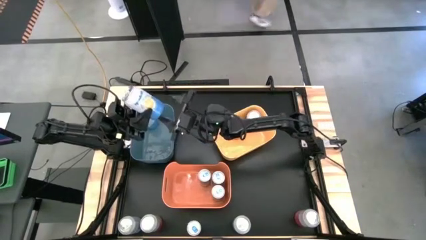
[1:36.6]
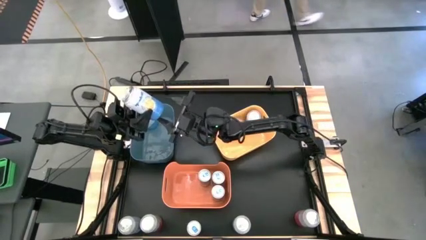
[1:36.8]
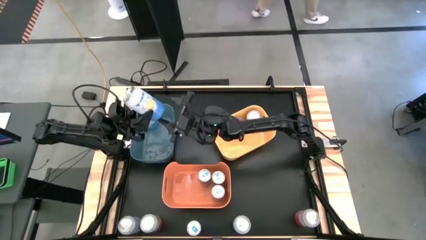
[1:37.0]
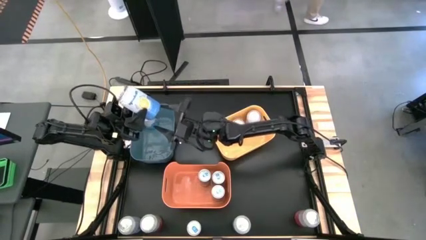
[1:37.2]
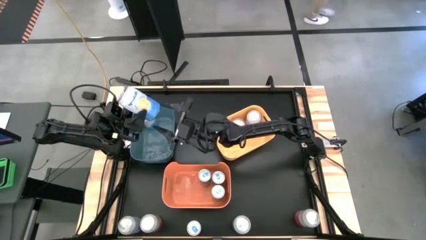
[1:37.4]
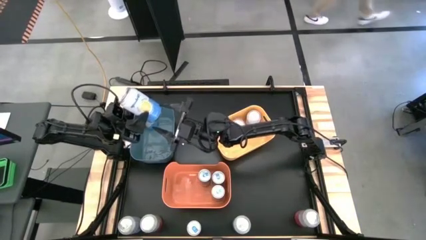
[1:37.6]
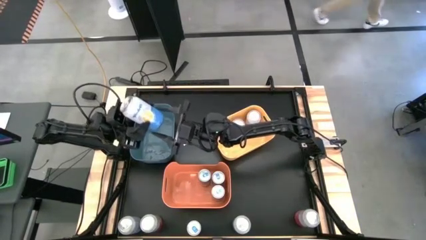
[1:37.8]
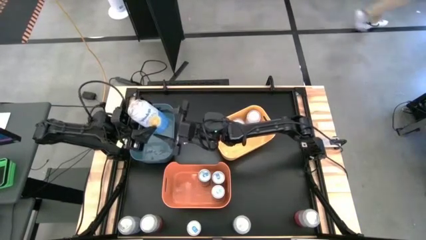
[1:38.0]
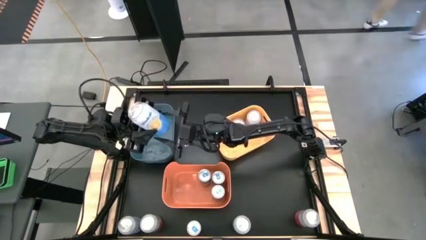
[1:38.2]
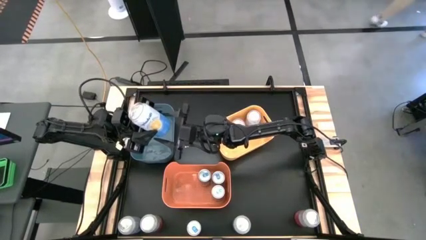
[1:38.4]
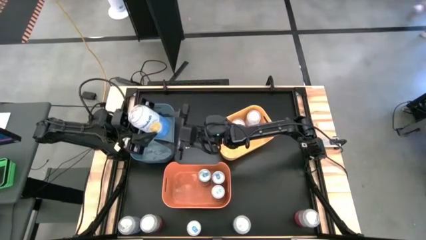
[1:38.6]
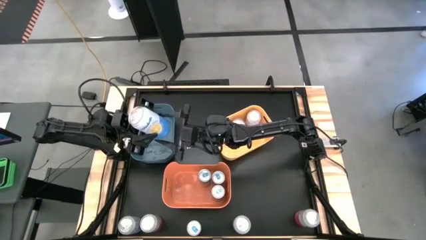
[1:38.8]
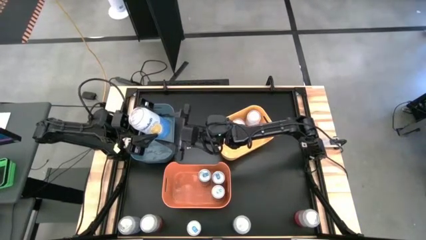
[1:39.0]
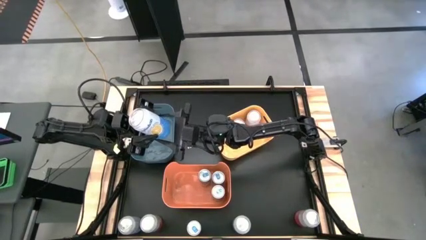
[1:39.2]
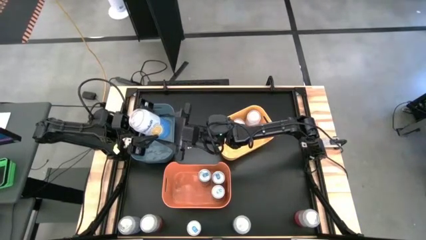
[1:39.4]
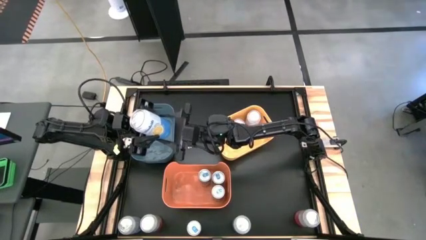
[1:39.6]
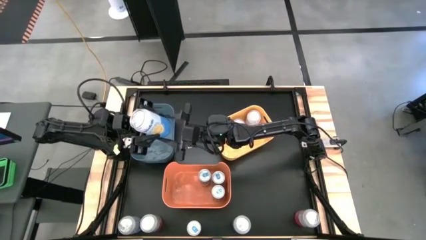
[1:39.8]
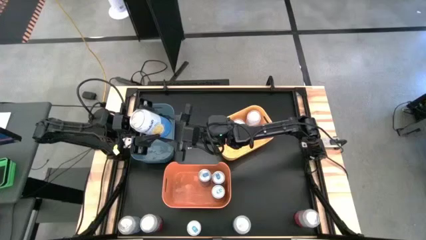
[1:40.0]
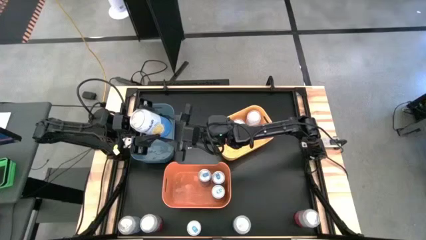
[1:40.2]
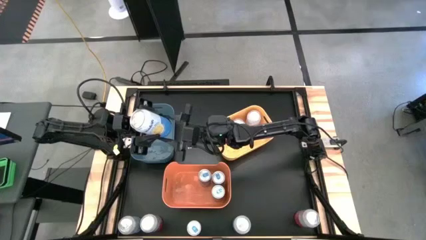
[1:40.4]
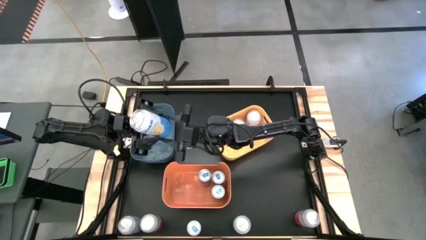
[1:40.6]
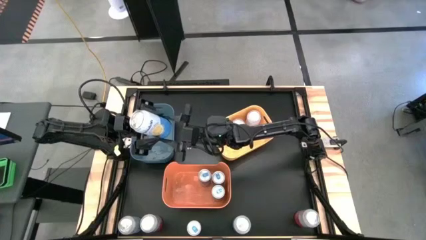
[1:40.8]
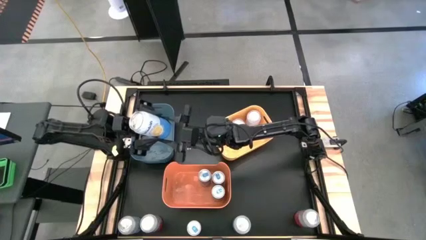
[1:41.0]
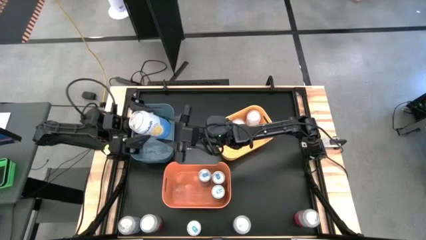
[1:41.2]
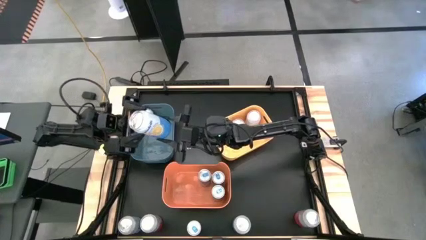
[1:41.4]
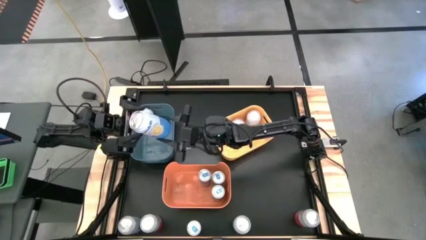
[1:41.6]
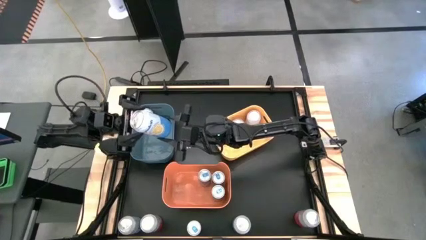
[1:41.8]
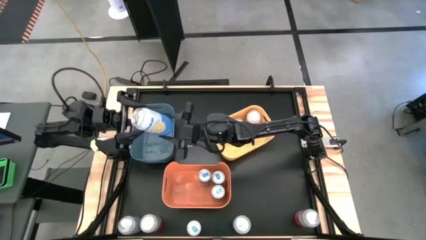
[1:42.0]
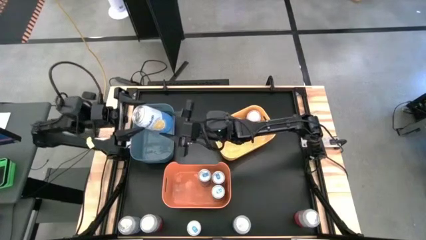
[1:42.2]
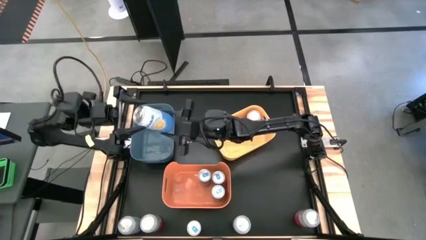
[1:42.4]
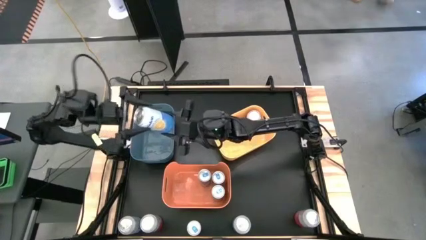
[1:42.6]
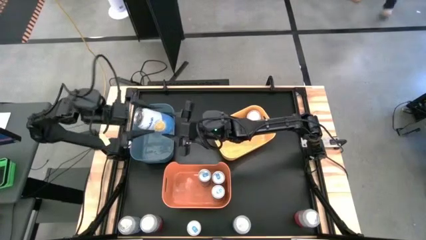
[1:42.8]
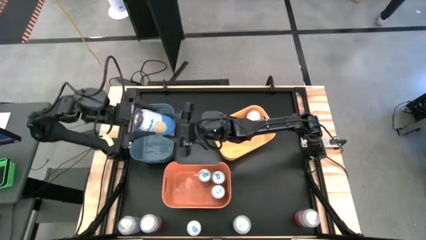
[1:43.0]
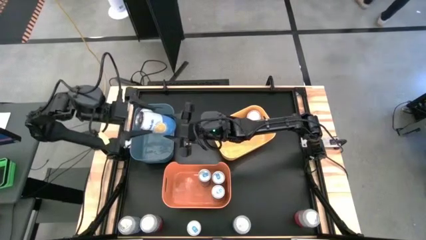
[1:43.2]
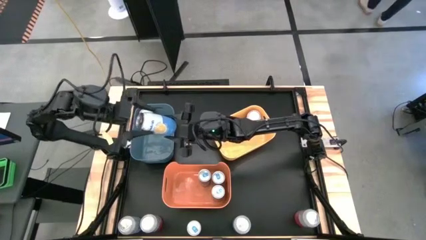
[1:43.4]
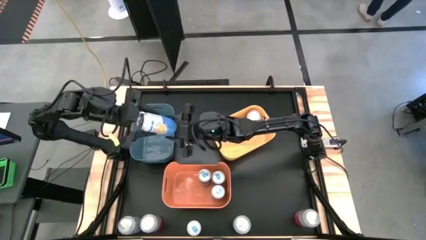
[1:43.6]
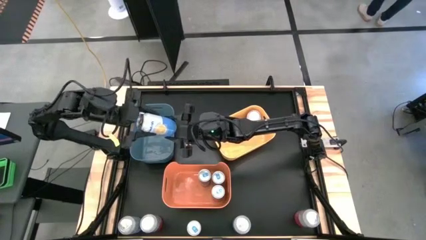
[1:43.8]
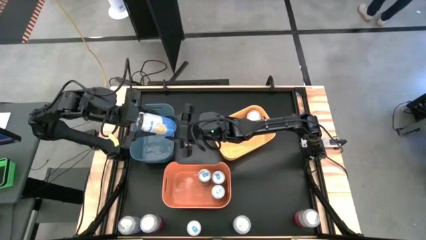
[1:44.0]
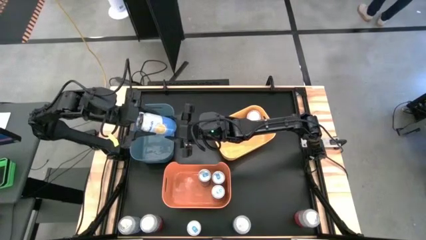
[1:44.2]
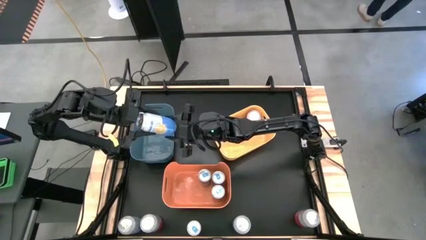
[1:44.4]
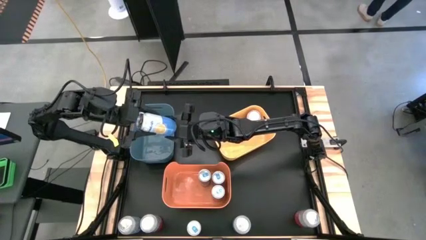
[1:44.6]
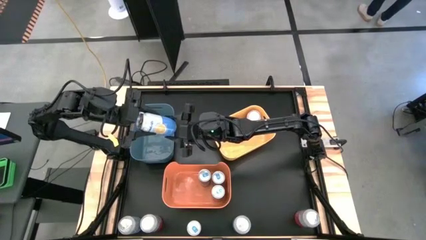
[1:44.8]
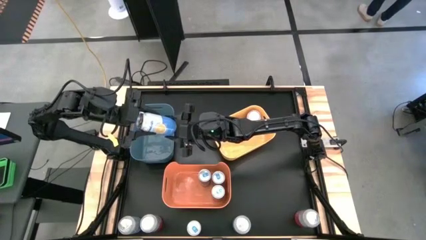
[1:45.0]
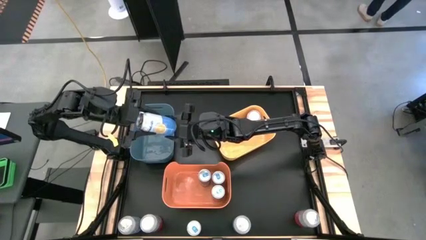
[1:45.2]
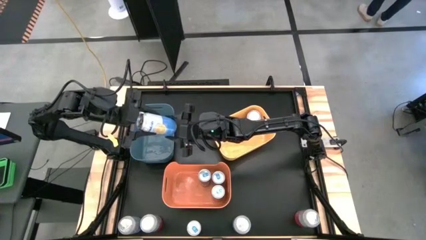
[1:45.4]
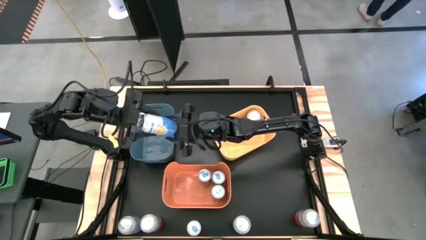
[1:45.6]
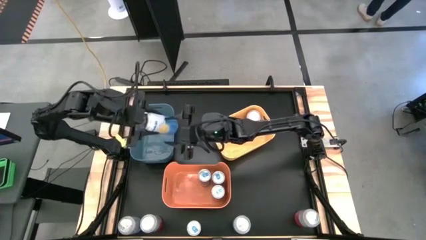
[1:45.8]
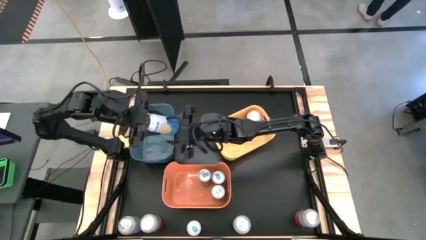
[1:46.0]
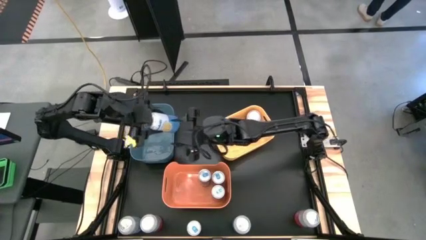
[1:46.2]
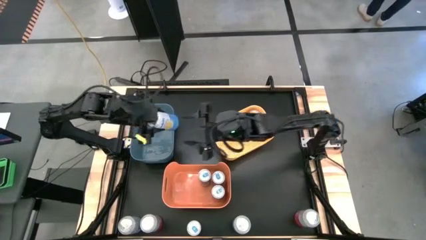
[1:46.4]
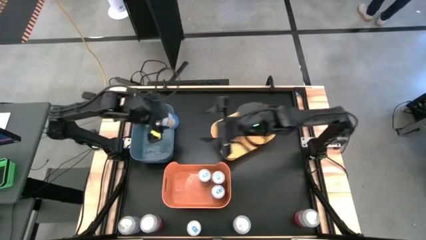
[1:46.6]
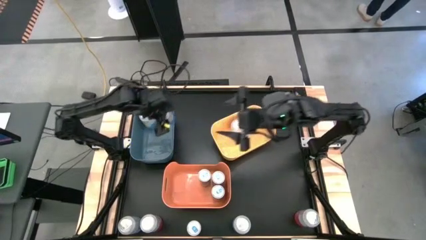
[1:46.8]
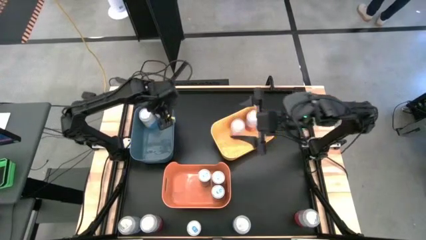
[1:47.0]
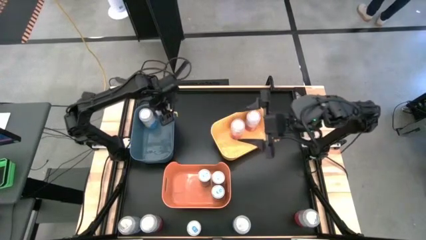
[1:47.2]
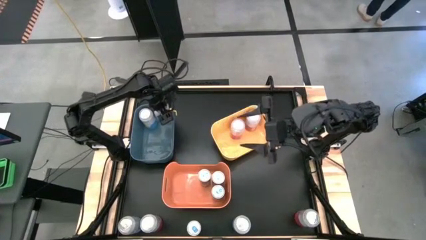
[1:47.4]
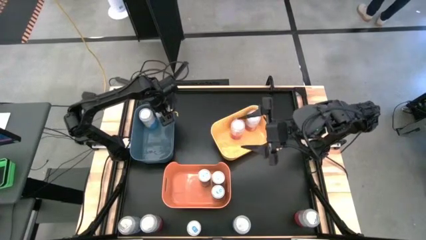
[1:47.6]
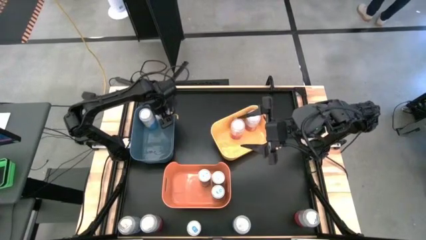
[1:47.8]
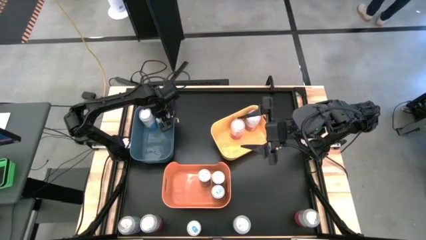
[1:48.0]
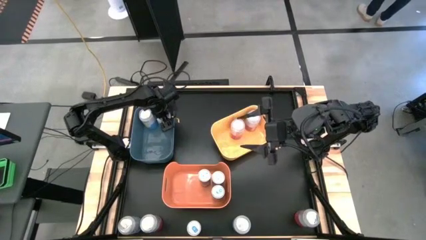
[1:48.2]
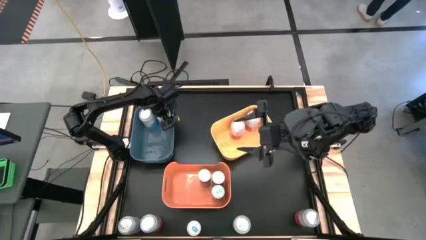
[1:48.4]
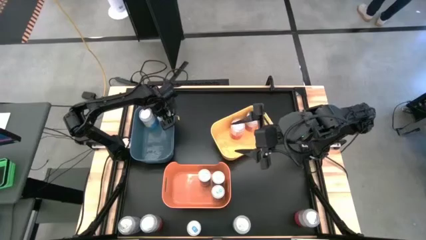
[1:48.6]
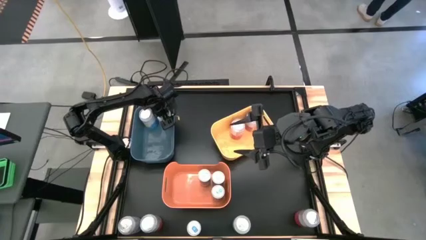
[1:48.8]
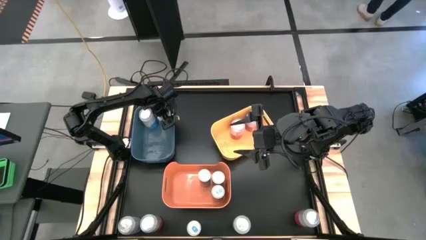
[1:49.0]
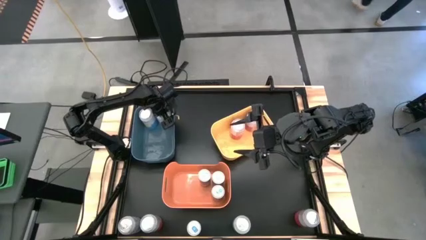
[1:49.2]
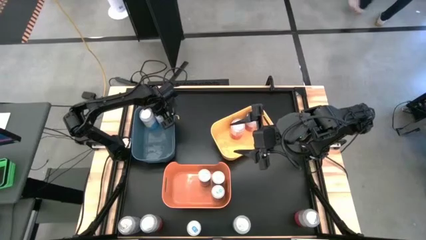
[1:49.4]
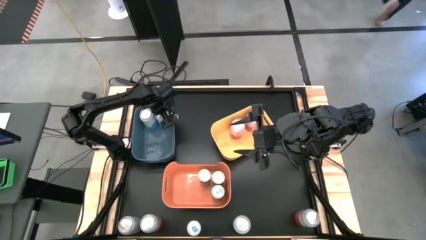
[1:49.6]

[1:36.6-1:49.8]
Task: Sort soda cans
Put the blue soda can into the blue bin

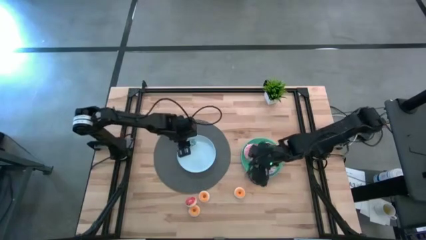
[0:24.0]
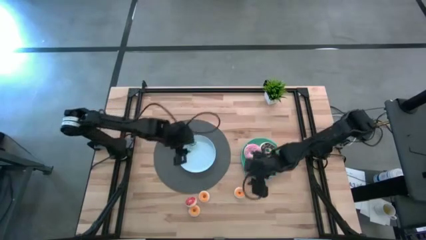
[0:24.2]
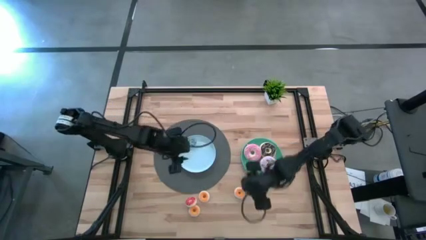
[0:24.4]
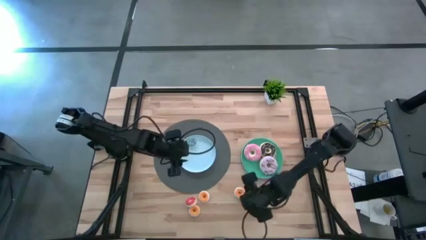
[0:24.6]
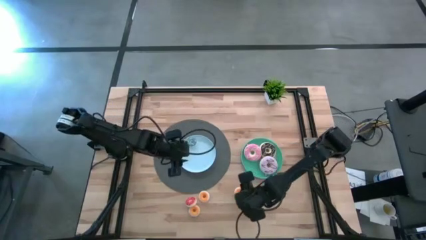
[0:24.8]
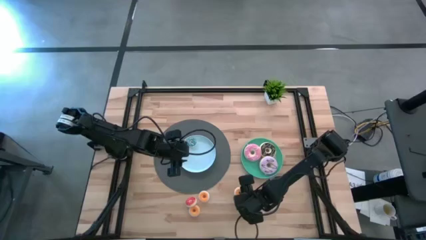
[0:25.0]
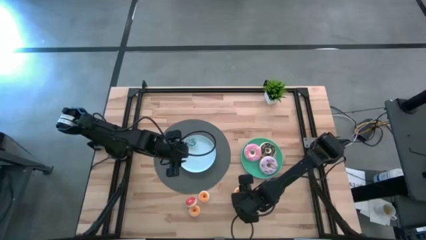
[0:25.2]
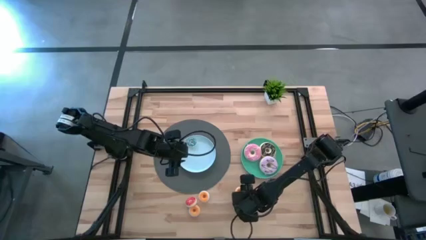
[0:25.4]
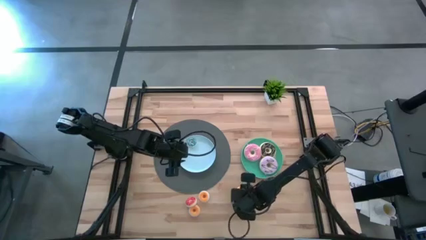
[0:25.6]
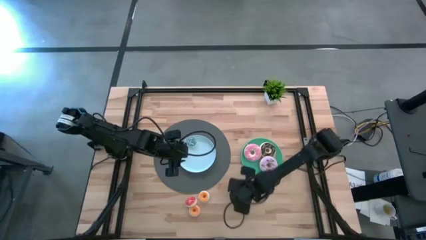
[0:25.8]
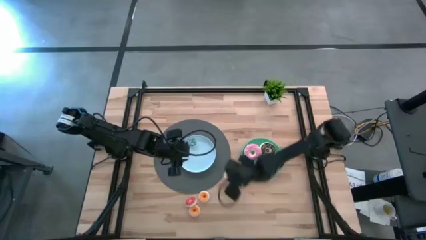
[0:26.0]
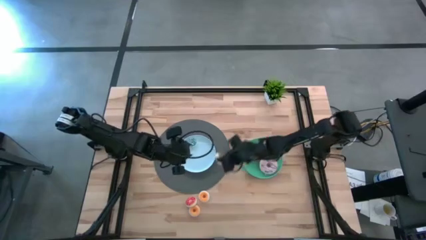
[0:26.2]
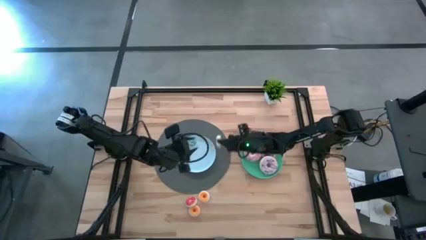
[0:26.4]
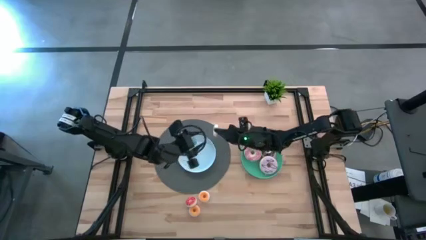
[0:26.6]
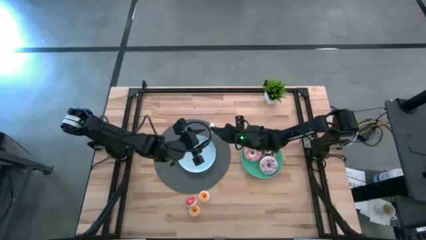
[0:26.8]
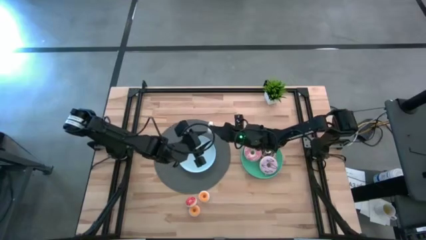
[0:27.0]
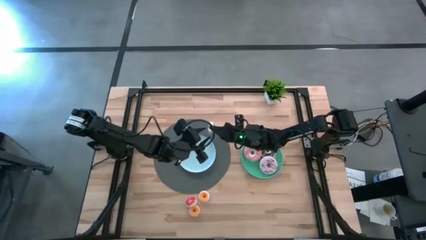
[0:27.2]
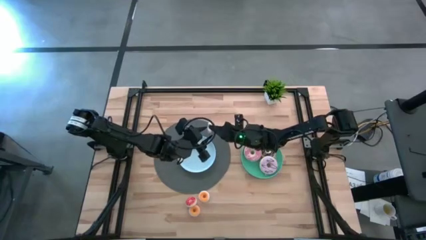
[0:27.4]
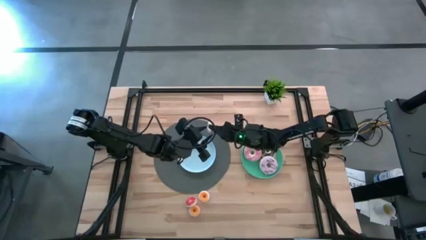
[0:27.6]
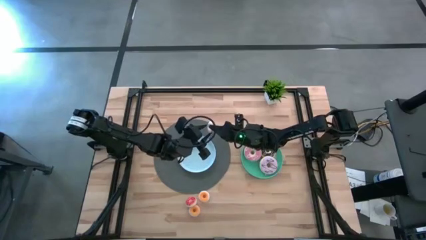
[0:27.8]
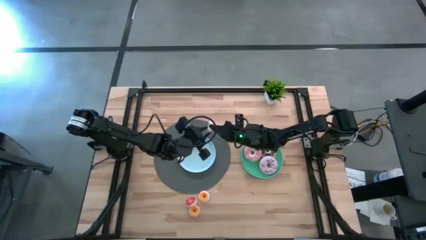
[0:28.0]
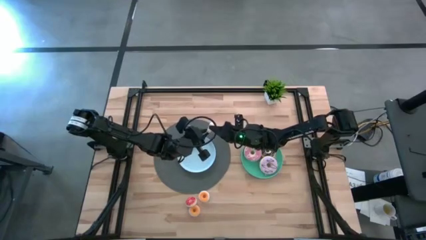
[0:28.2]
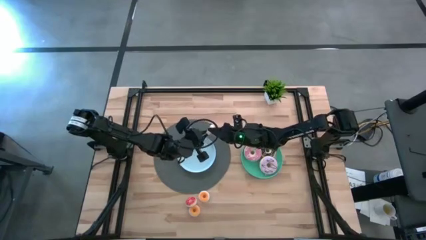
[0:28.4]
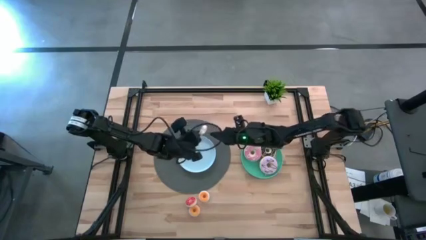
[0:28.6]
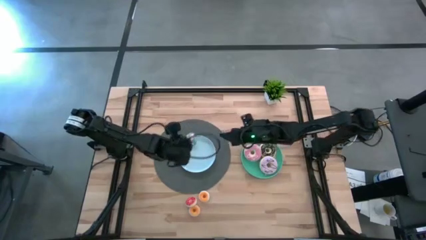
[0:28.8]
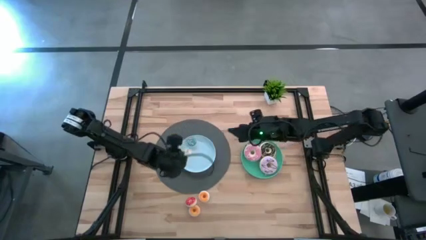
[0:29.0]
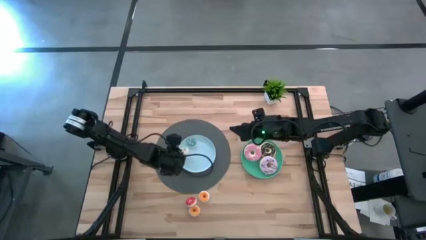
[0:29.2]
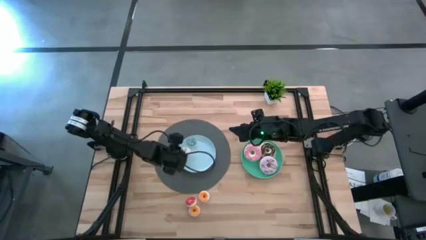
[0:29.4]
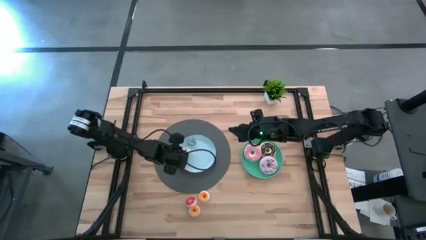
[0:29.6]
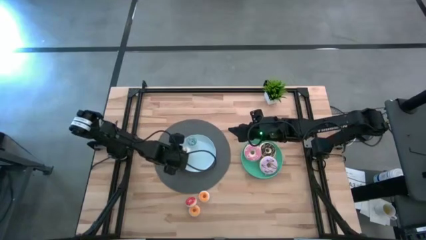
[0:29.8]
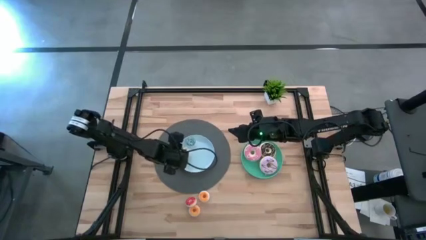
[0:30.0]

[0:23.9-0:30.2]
Task: Pick & Place donuts
Put the small white donut on the blue plate
